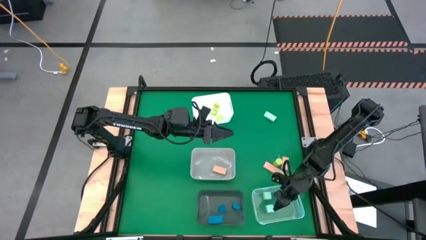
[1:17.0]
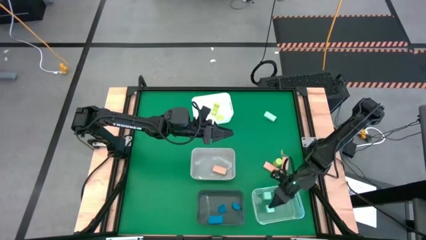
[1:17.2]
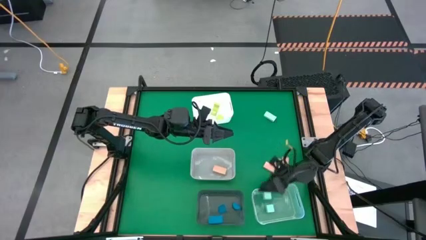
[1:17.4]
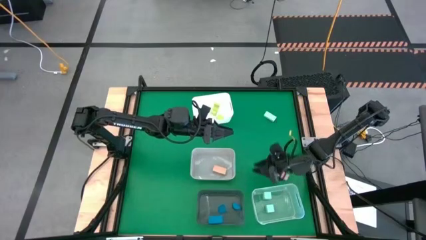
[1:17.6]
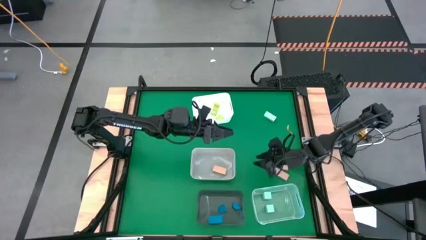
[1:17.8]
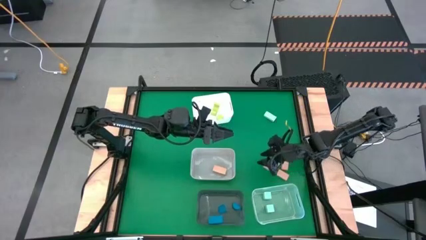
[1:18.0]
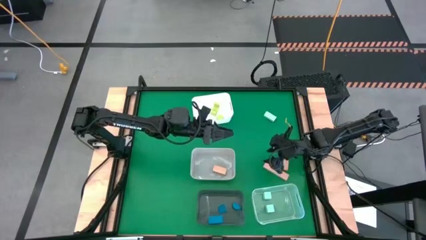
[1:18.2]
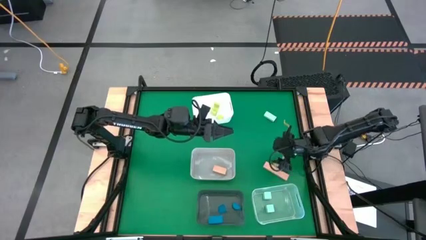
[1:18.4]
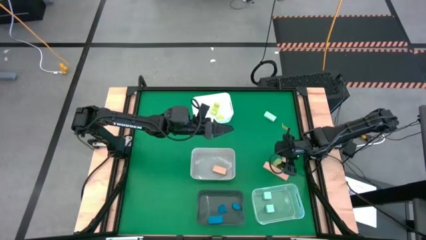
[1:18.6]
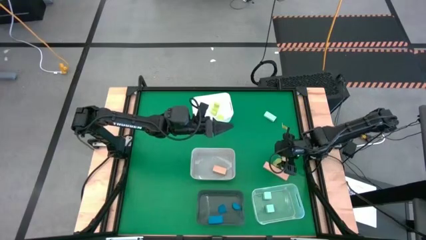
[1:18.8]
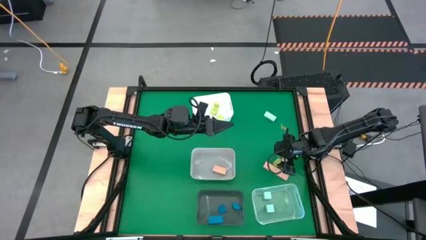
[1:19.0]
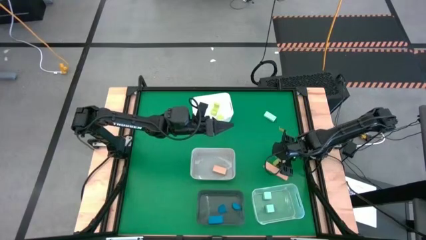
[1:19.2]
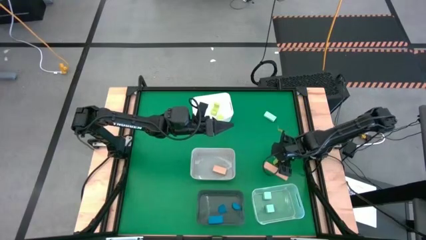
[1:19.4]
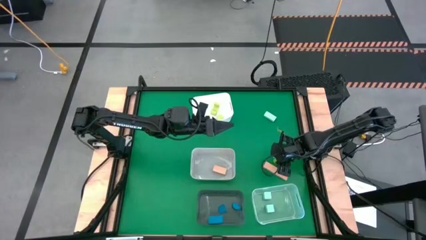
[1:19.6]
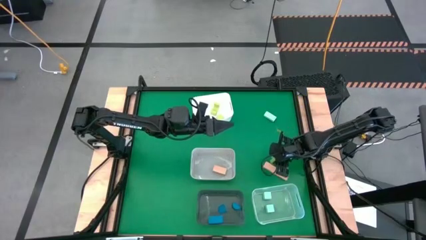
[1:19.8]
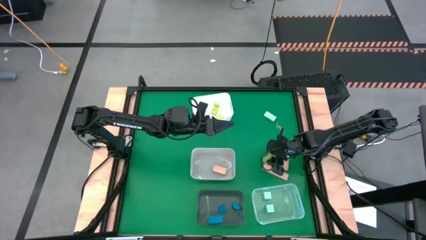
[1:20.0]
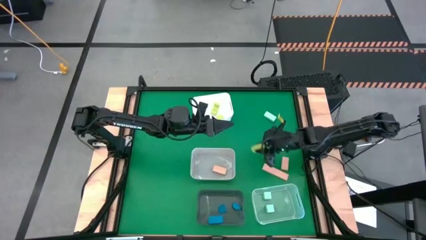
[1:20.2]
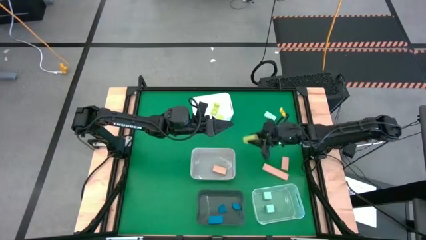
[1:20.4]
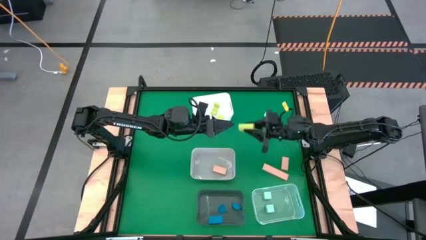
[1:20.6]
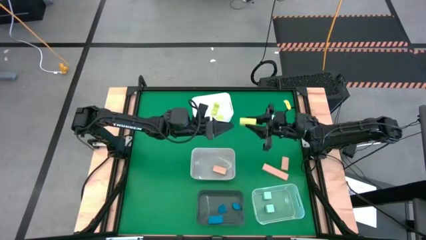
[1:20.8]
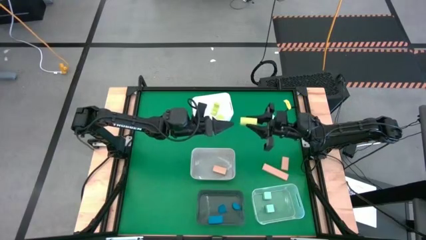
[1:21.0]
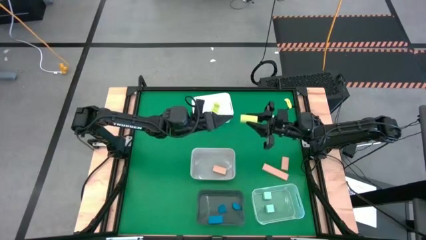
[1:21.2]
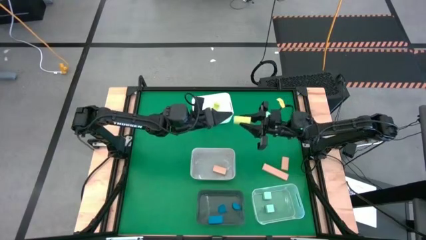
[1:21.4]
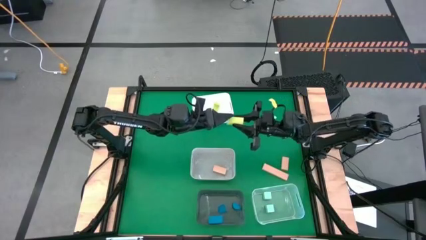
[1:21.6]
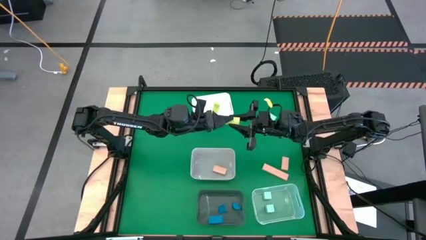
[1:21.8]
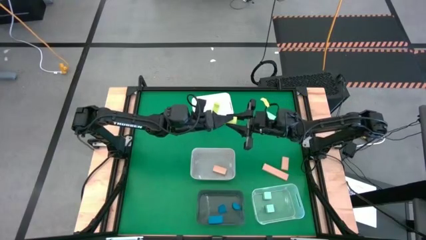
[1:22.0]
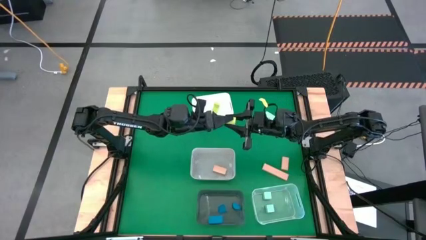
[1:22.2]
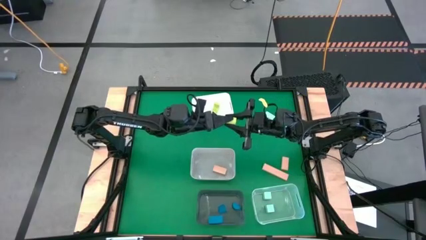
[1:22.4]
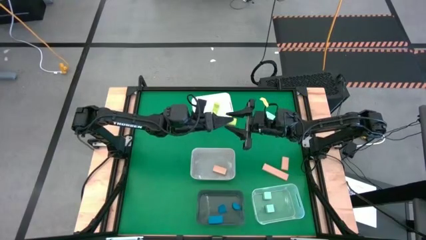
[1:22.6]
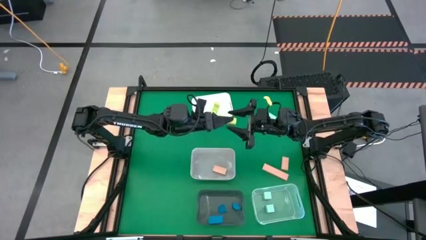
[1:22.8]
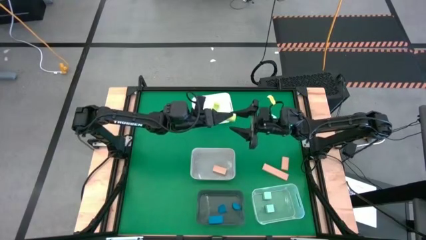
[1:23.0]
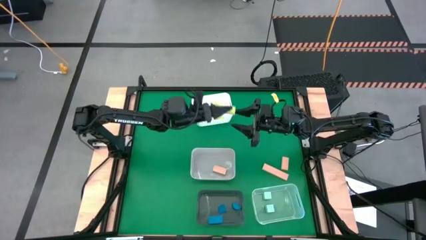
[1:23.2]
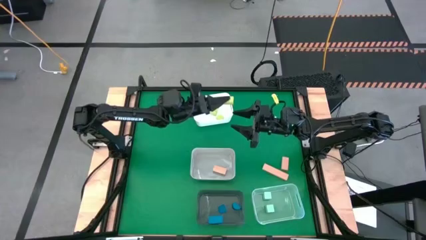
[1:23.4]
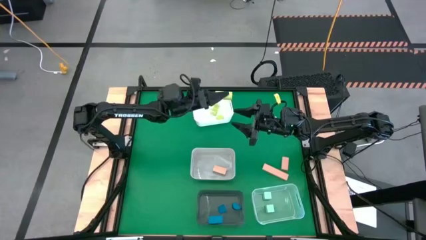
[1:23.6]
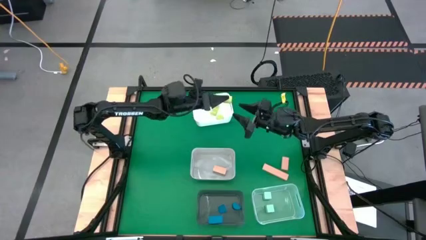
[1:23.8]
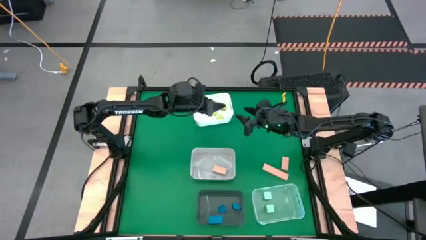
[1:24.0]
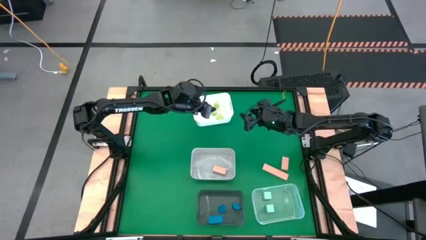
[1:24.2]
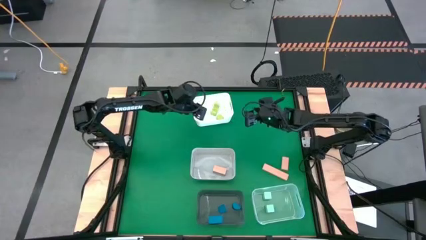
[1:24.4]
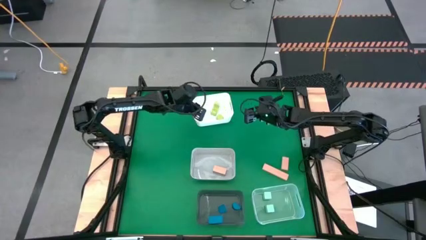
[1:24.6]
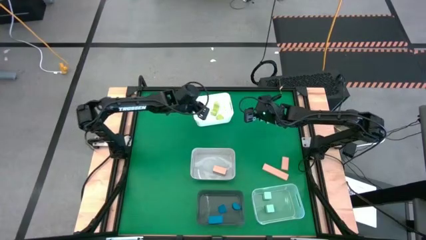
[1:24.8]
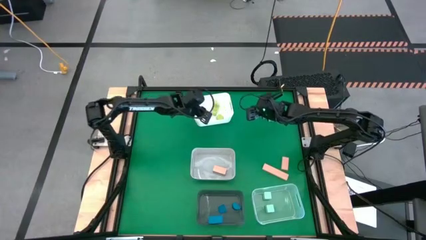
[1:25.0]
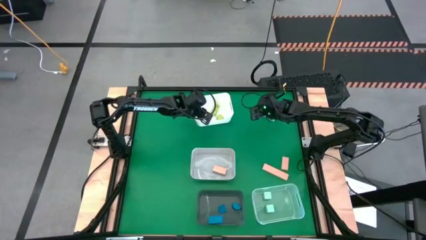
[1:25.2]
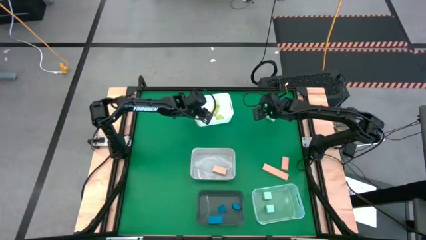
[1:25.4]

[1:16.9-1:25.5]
Task: Sort & place blocks by color
Put the light green block into the white bin

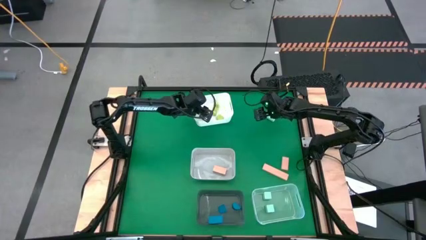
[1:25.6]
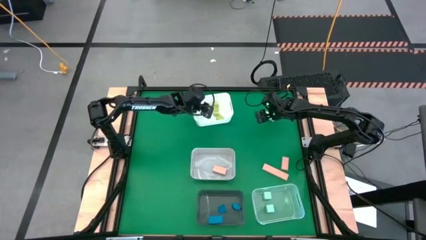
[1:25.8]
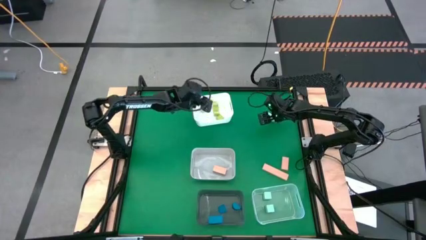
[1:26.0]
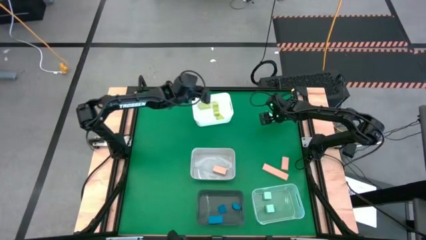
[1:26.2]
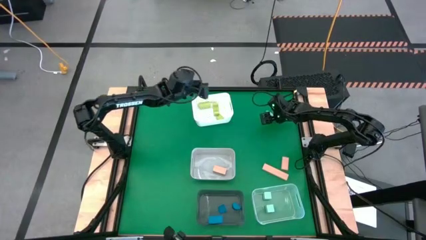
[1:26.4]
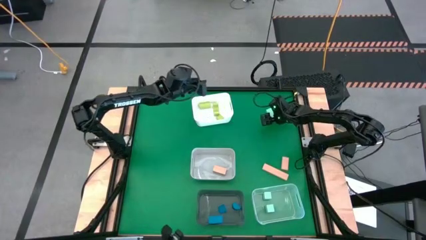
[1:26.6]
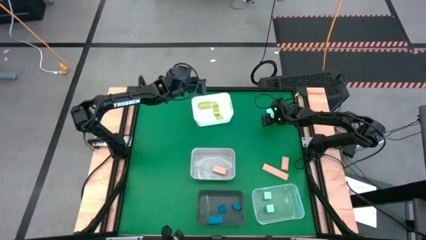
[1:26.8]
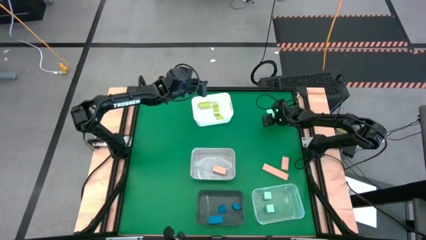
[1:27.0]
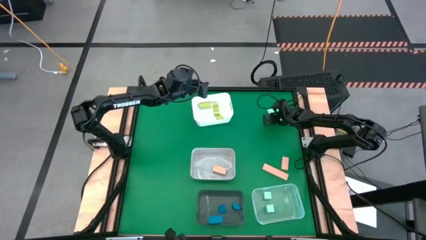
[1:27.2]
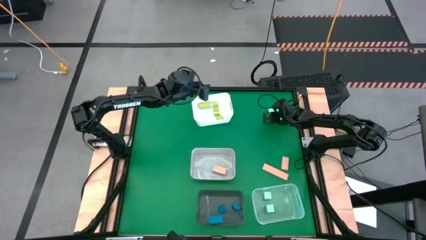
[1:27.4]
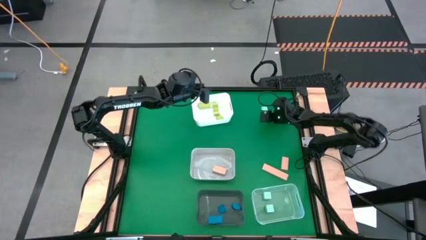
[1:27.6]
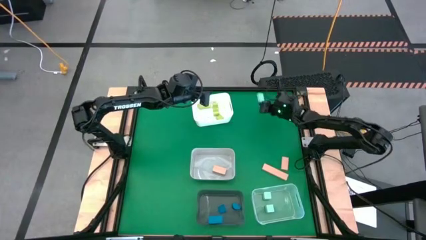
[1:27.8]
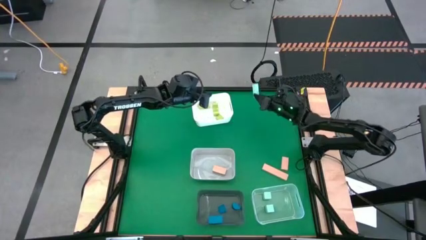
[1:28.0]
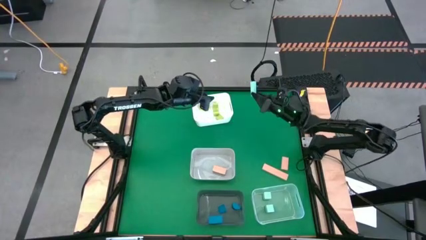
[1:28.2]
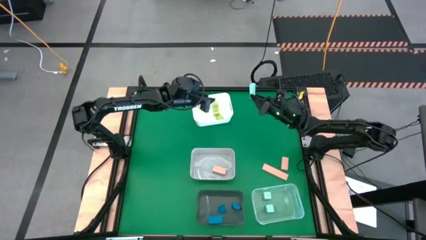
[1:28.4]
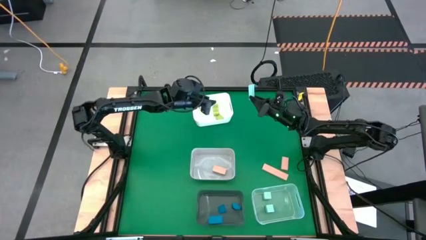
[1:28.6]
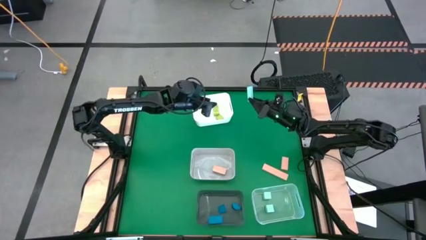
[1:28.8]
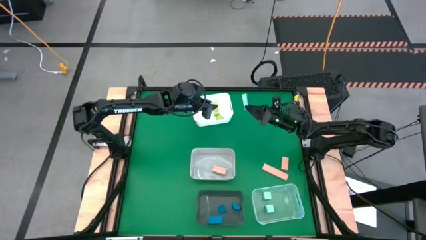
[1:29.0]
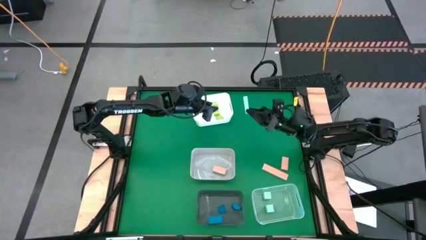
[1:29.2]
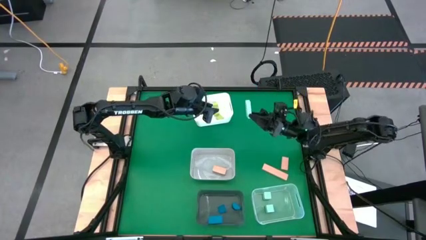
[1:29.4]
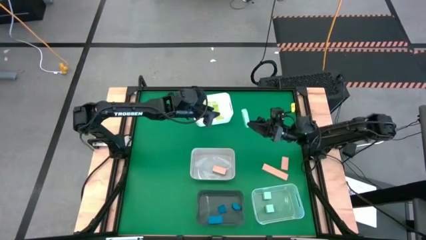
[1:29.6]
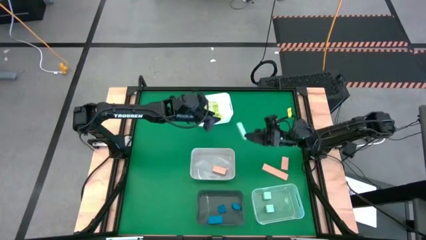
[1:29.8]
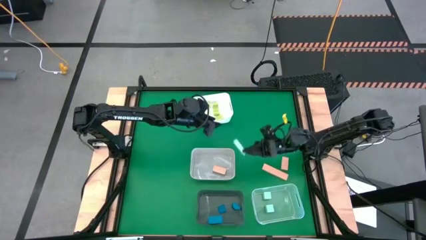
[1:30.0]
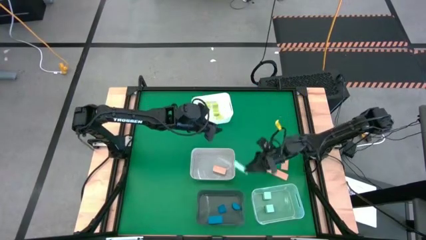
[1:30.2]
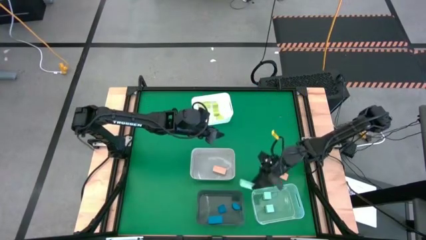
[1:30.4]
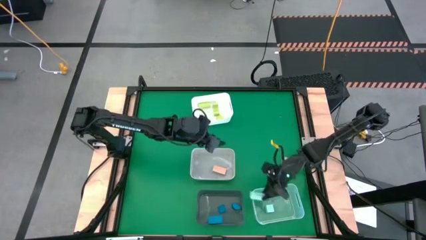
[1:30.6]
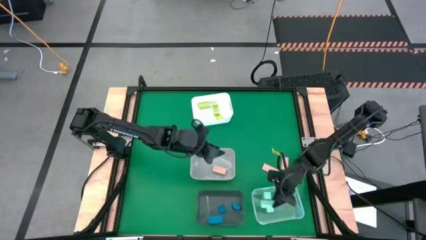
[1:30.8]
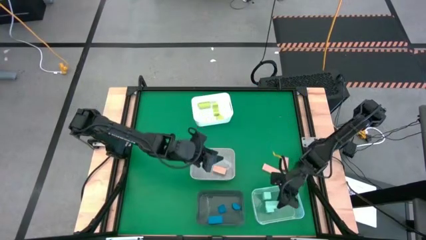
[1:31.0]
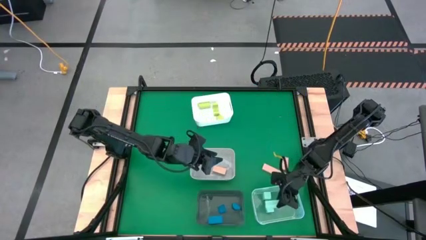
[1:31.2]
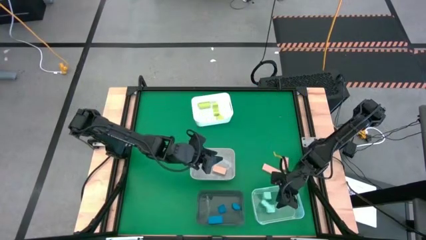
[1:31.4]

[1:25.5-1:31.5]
Put the light blue block into the transparent bin
